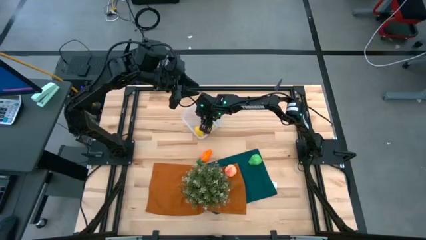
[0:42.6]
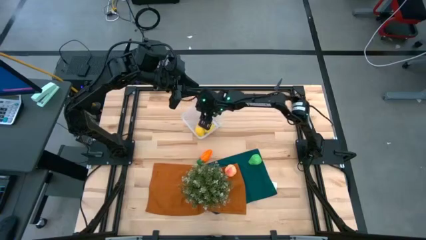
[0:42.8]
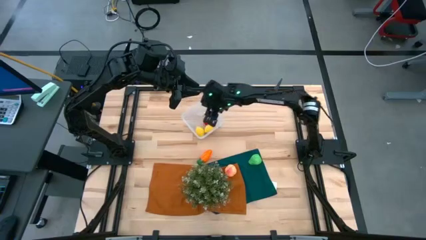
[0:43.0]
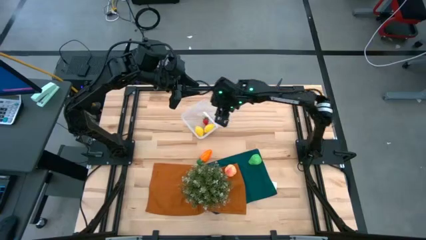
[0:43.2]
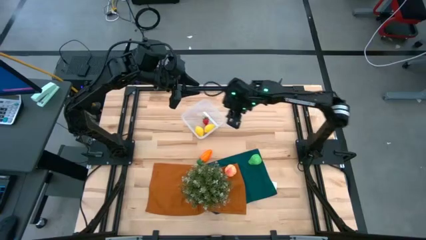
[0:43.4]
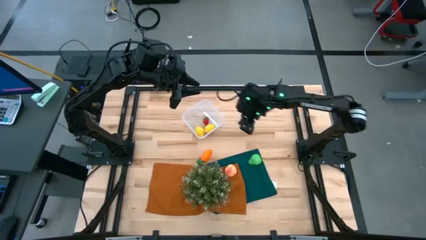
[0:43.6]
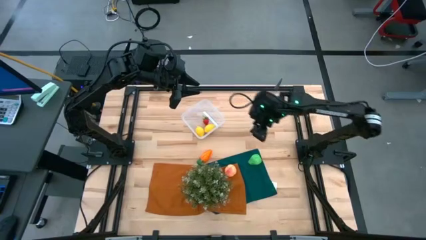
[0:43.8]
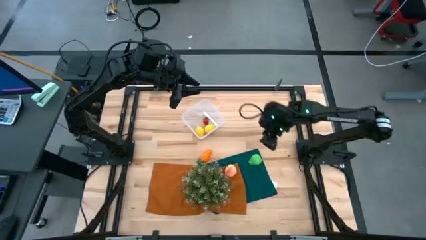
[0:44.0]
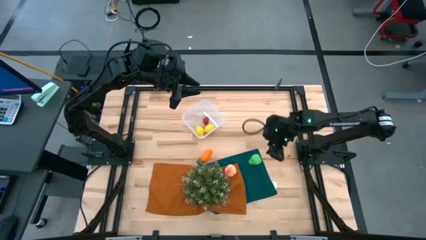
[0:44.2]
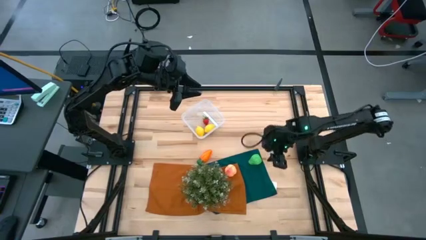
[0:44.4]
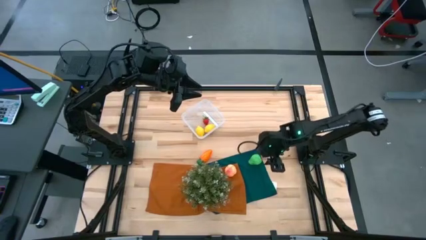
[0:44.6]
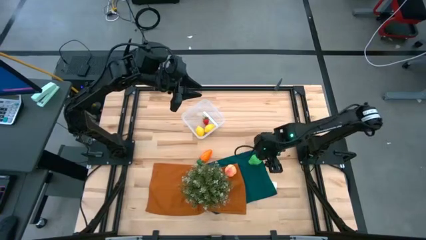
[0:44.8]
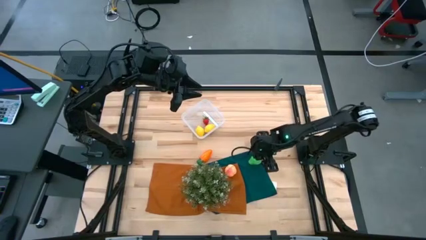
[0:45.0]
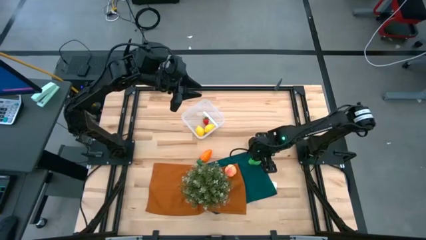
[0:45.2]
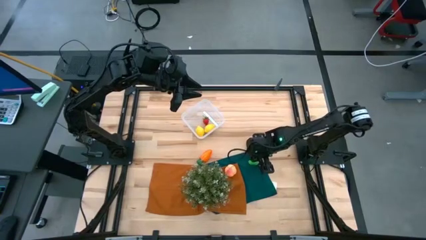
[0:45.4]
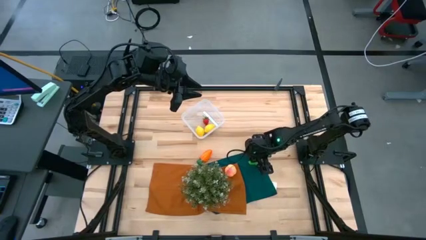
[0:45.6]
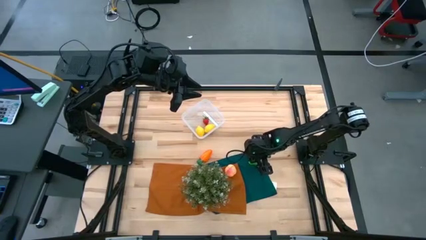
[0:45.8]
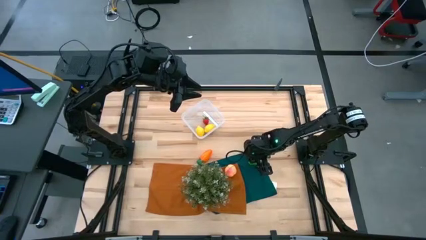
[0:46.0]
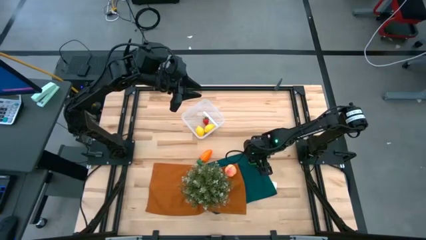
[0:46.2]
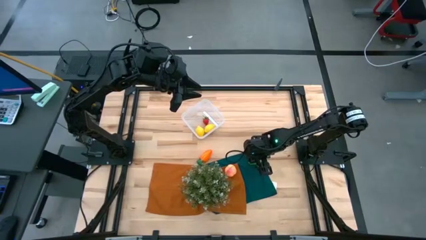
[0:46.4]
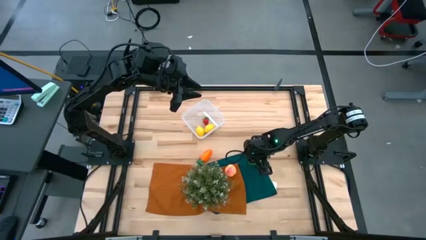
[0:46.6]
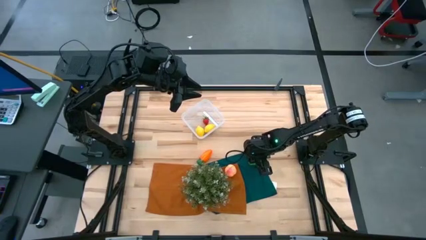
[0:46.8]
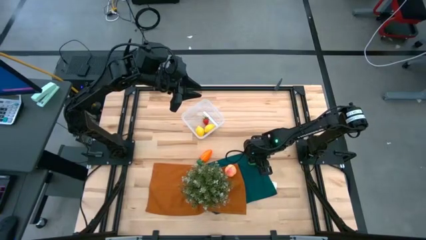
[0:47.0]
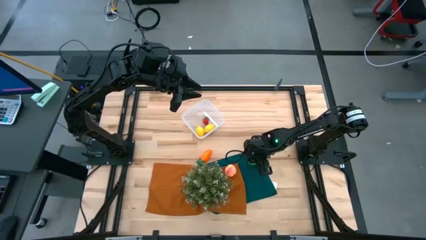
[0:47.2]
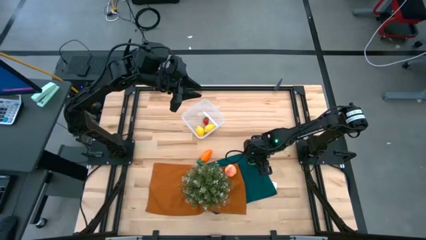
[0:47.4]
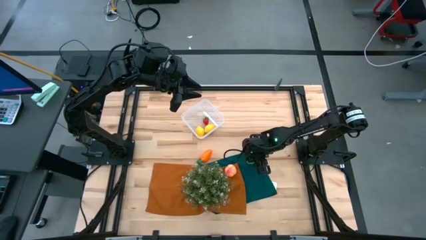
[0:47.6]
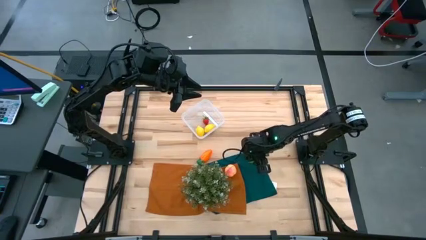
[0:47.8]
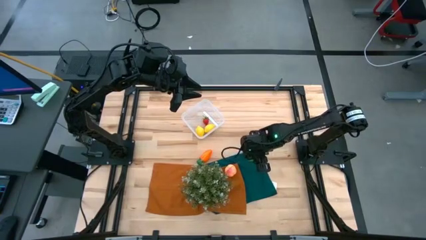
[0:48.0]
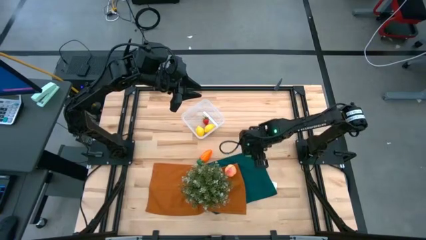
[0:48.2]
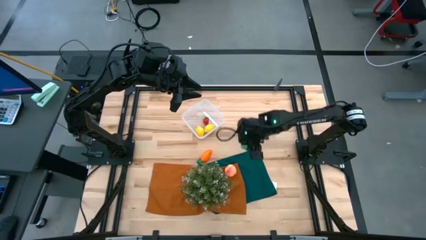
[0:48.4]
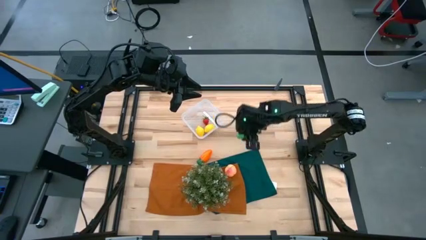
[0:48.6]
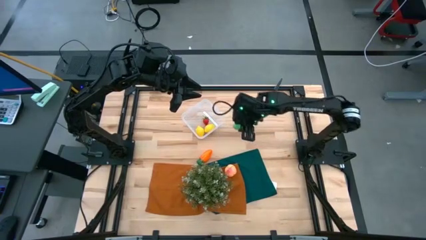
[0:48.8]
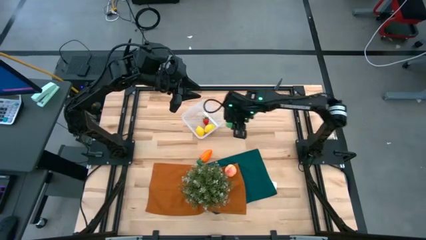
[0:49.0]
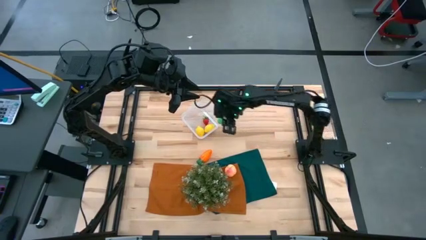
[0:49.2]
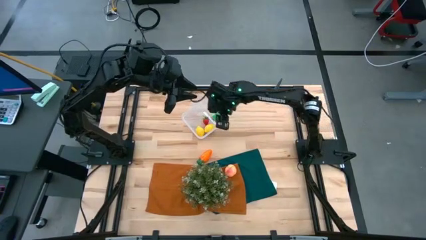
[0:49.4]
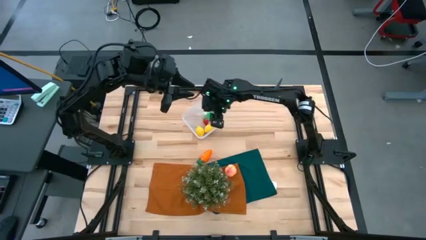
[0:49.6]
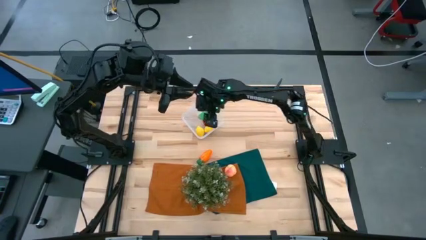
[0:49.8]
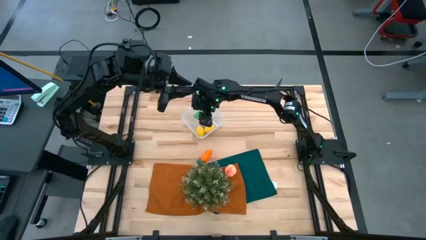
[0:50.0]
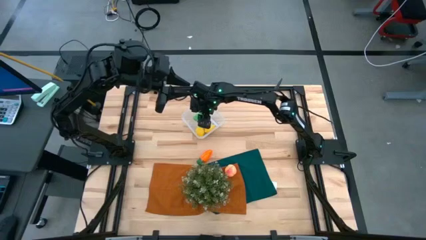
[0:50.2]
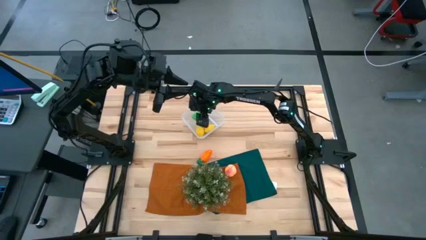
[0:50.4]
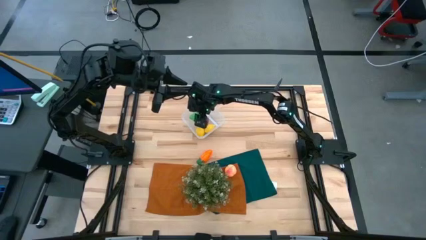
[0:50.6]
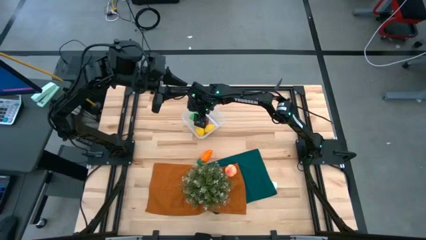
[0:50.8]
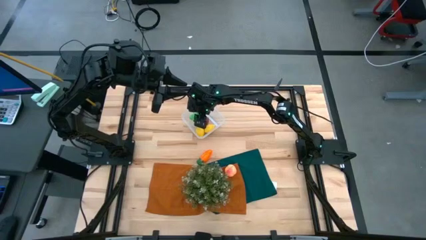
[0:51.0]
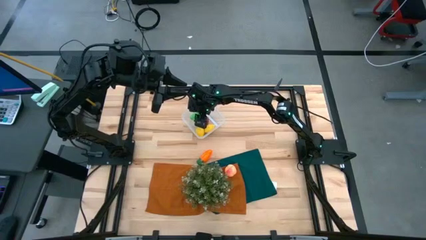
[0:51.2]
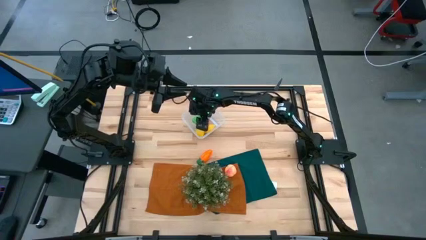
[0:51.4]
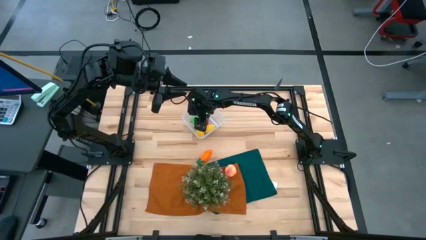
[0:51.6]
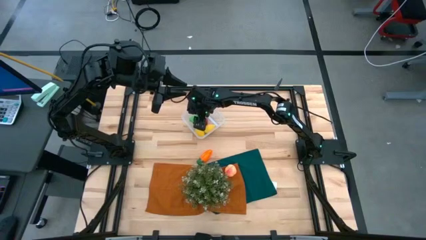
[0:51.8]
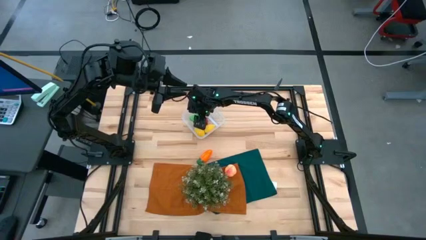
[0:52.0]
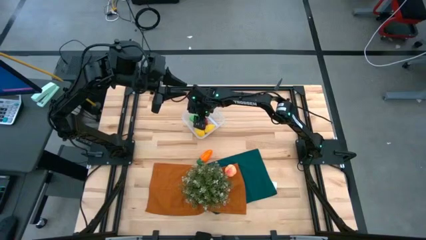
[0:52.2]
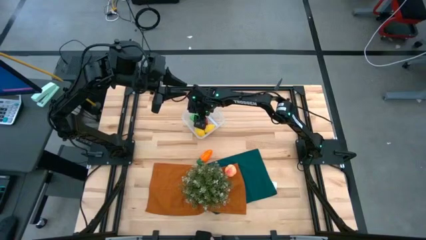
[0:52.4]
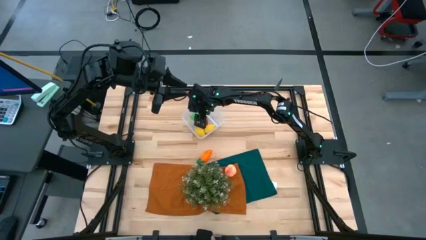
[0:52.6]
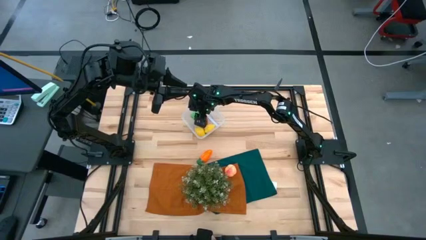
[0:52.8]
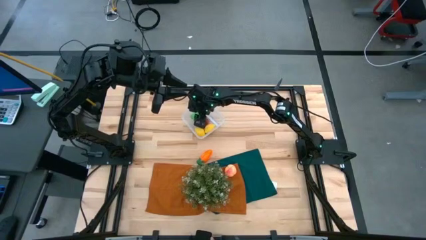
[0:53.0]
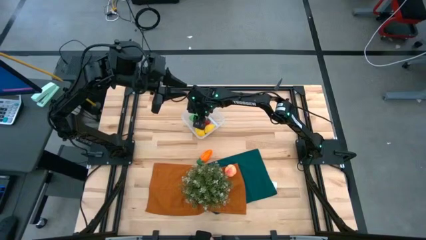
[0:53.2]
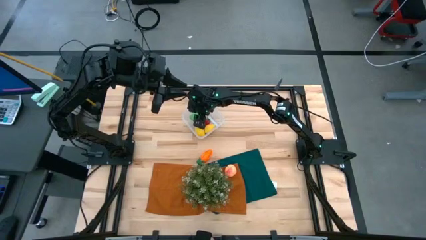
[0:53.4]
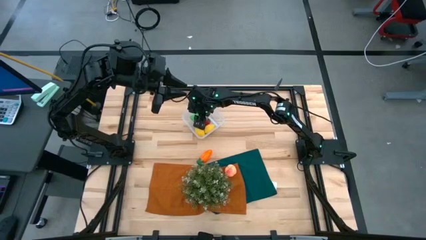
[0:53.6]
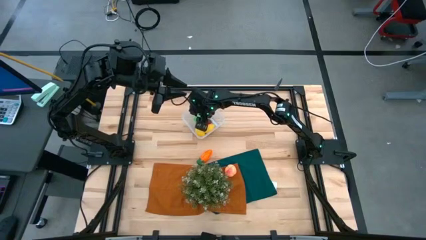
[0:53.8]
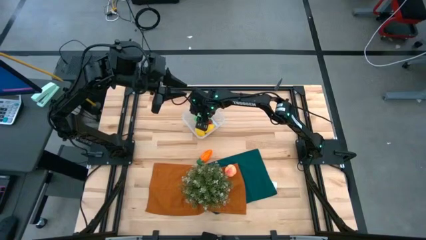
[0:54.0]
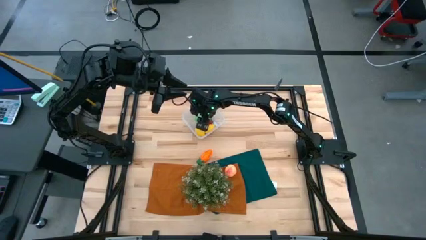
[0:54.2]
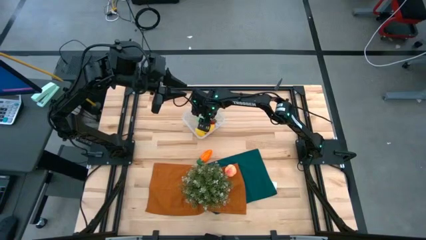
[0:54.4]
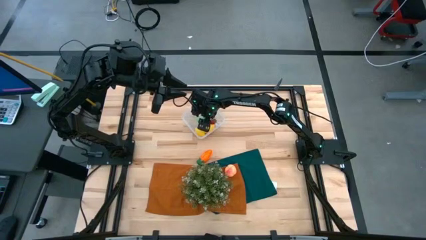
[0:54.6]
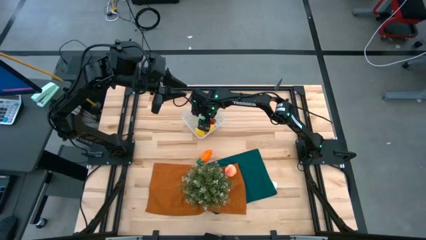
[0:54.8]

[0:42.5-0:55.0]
Task: Pick and placing Produce into tupperware
Put the pear into the transparent container

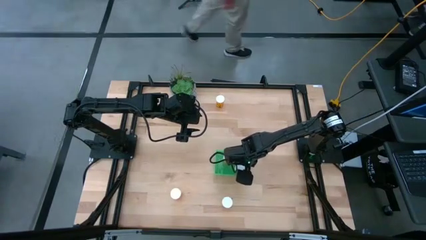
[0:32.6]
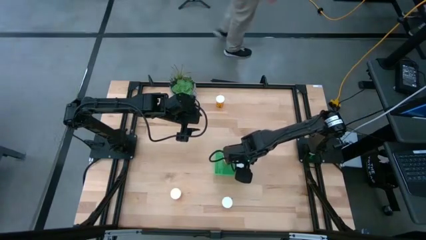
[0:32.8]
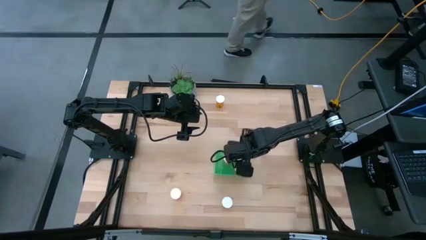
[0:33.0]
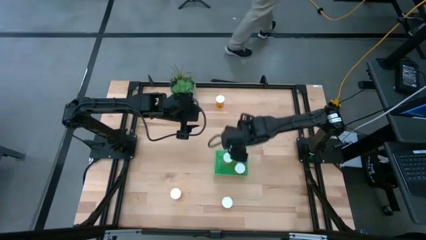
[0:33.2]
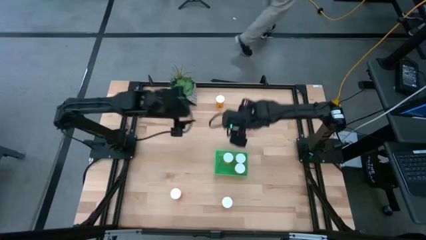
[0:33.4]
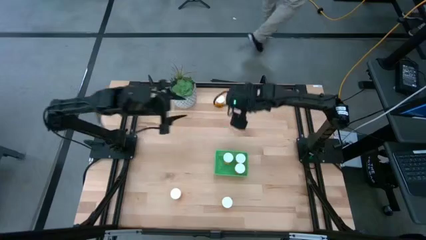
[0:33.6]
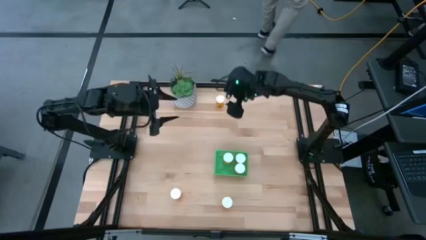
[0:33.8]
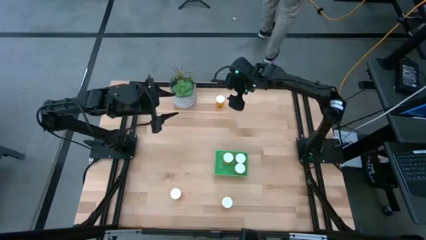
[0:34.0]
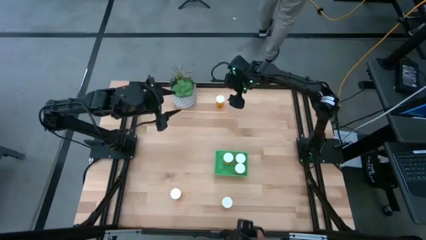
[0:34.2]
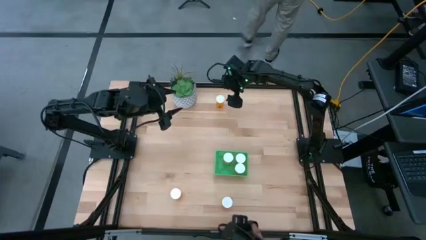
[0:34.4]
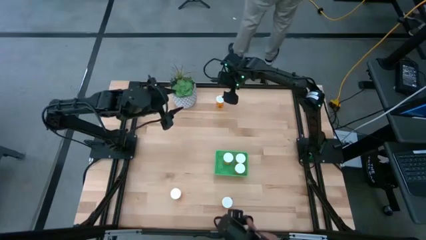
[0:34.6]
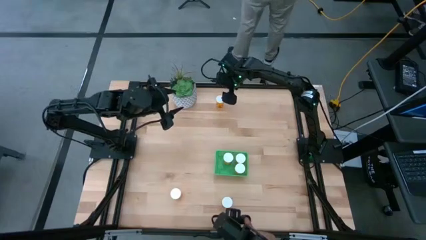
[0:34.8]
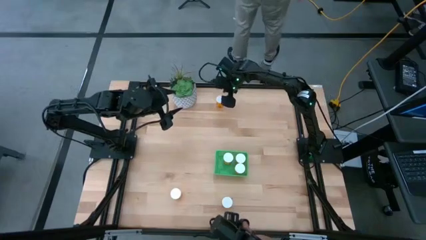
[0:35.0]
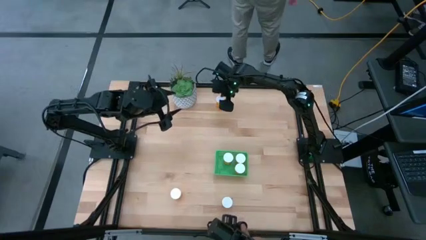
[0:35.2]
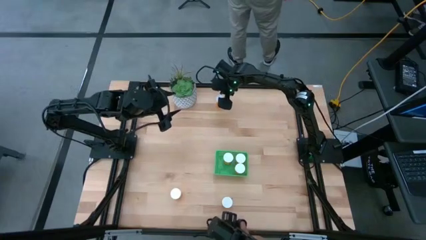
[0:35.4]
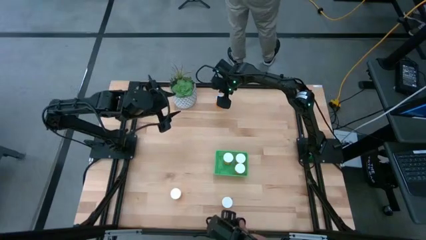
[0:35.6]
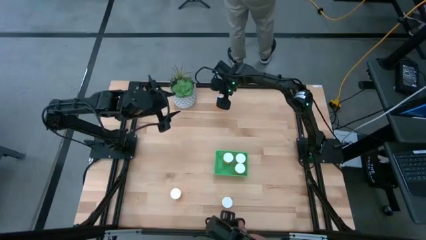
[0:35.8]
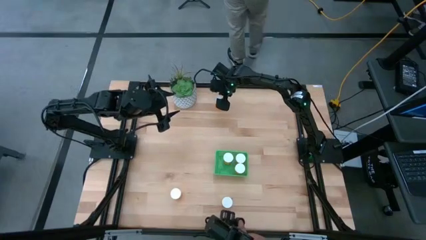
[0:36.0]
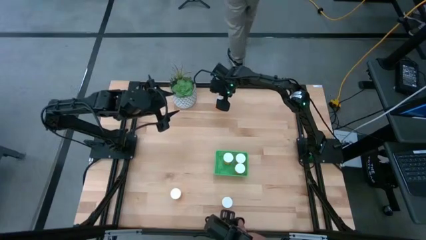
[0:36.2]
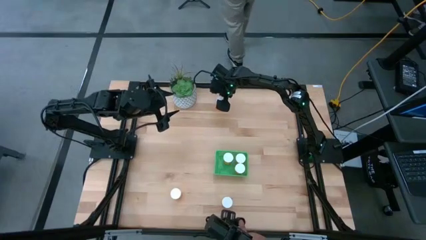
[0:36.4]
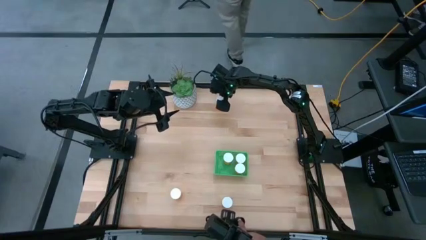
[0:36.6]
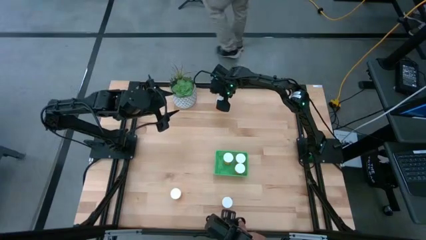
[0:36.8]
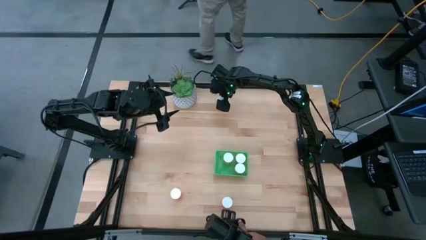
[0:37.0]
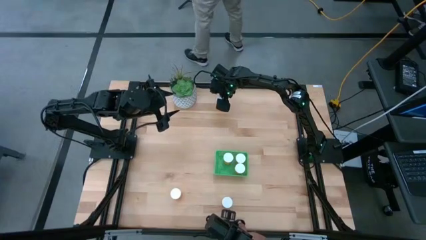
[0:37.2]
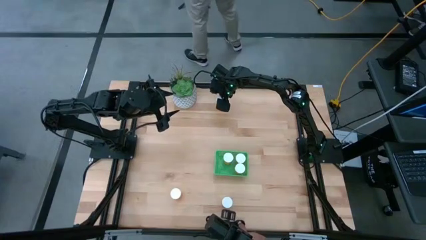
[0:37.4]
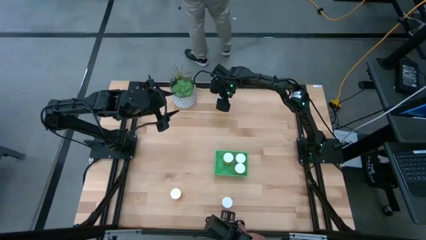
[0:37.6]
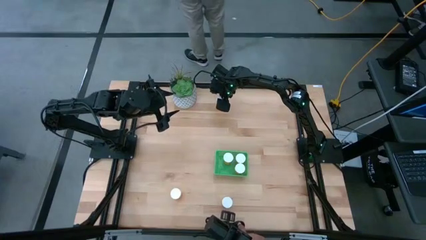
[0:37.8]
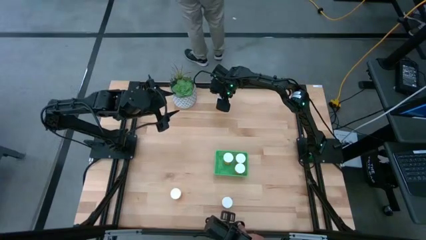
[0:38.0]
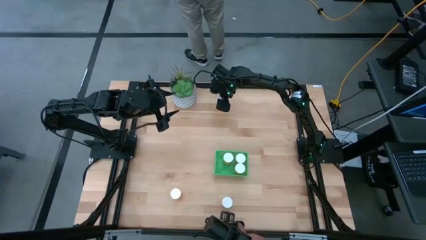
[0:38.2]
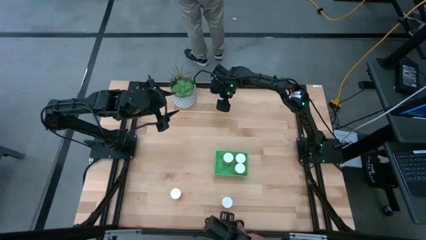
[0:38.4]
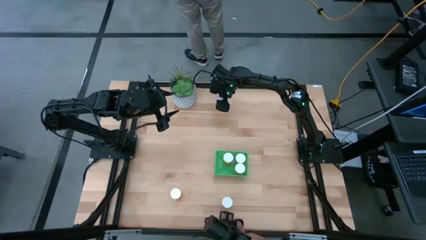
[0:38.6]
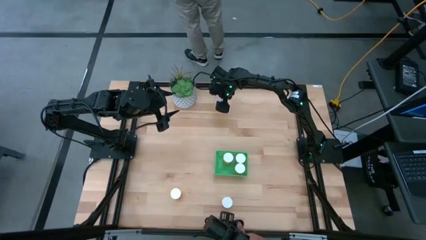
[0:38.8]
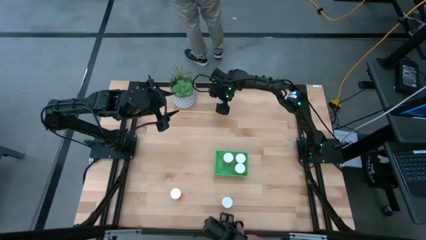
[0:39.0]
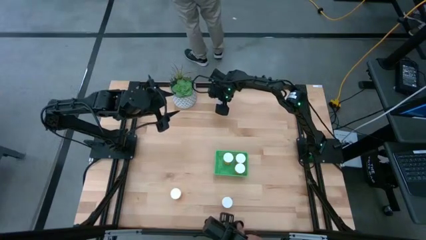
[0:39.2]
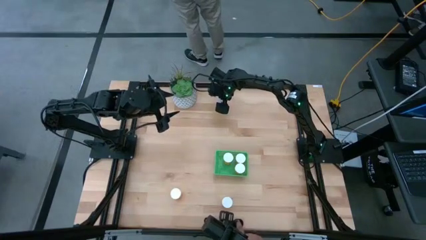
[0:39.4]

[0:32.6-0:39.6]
Task: Pick and place pill bottles into a basket
Put the orange pill bottle into the green bin
